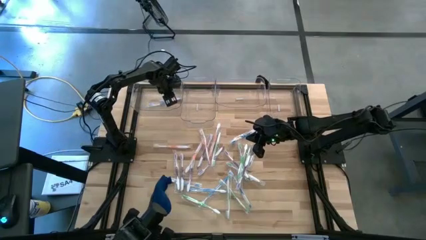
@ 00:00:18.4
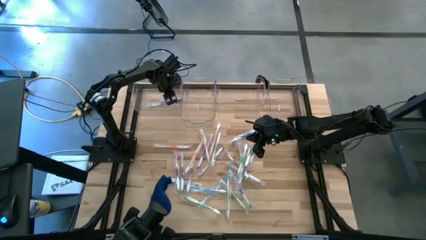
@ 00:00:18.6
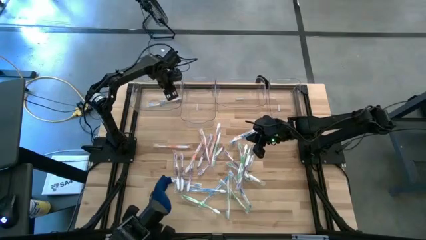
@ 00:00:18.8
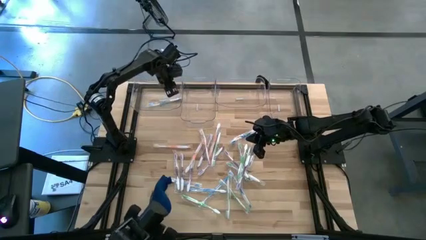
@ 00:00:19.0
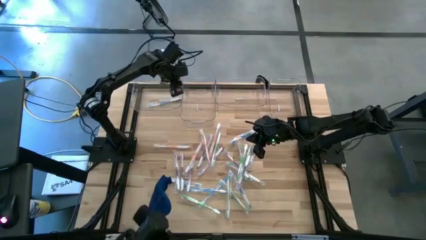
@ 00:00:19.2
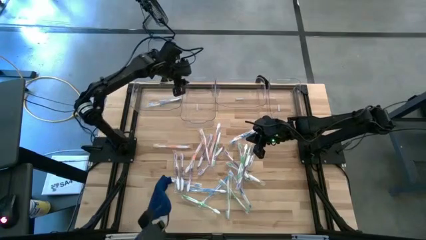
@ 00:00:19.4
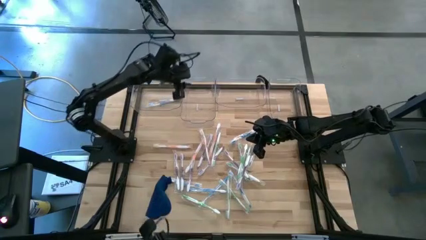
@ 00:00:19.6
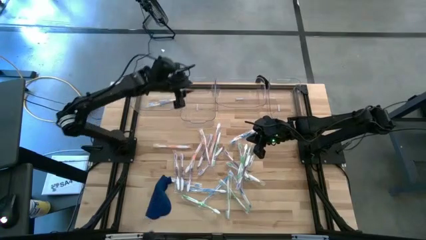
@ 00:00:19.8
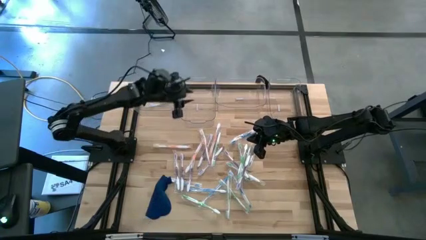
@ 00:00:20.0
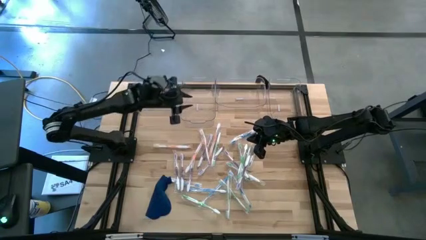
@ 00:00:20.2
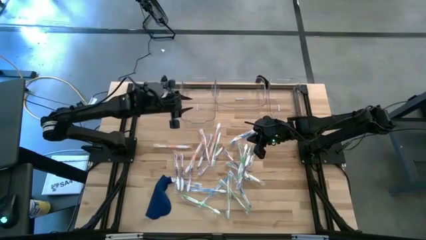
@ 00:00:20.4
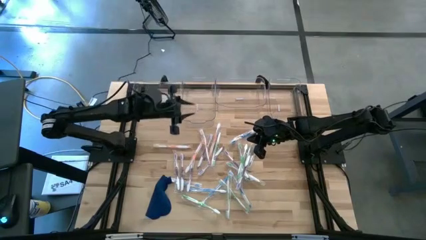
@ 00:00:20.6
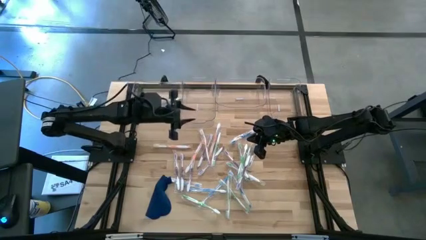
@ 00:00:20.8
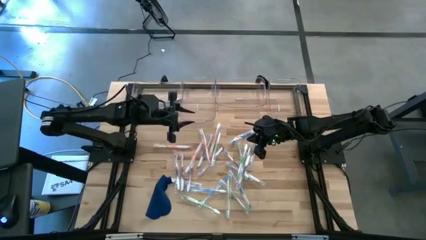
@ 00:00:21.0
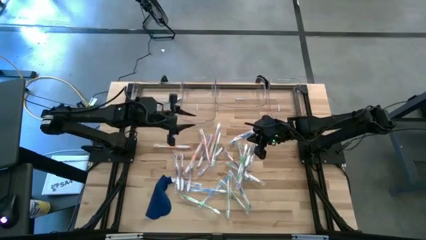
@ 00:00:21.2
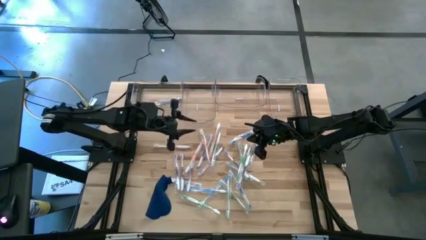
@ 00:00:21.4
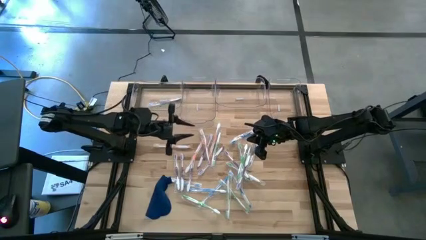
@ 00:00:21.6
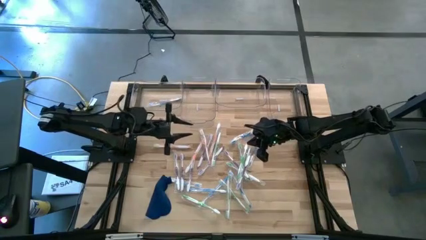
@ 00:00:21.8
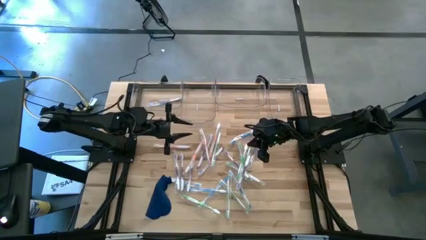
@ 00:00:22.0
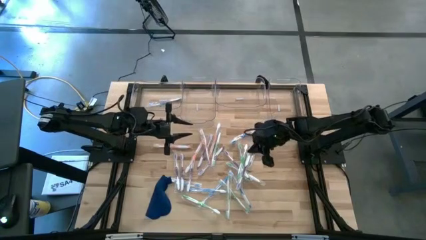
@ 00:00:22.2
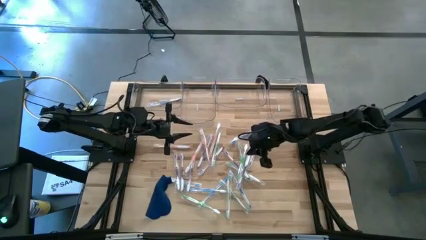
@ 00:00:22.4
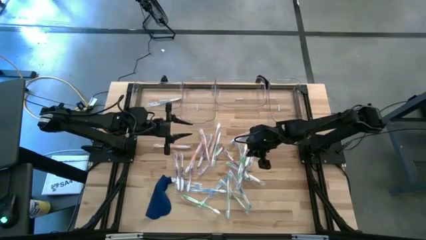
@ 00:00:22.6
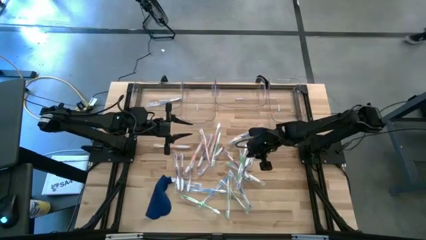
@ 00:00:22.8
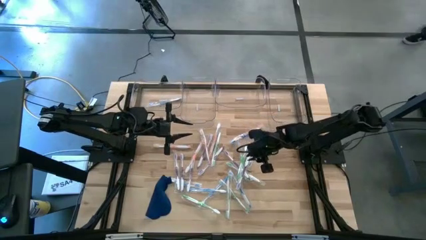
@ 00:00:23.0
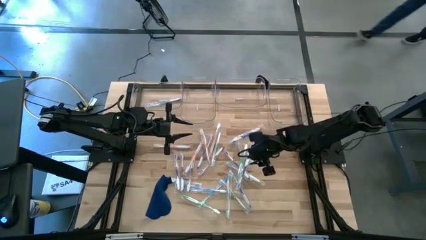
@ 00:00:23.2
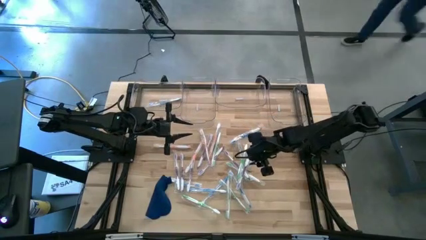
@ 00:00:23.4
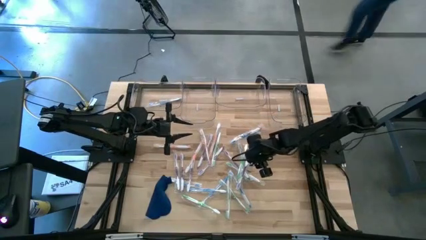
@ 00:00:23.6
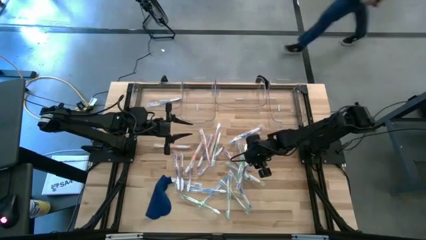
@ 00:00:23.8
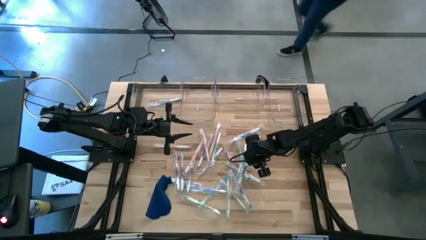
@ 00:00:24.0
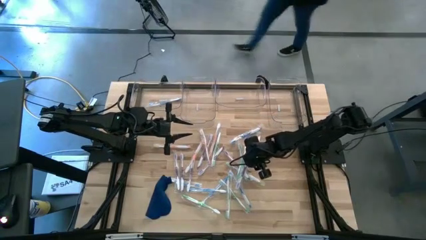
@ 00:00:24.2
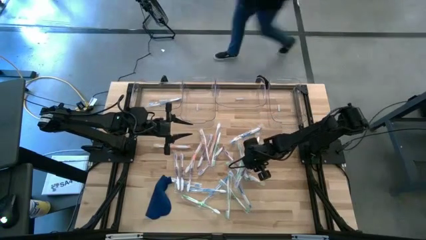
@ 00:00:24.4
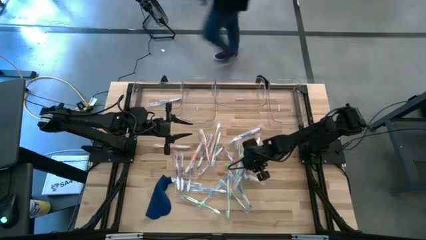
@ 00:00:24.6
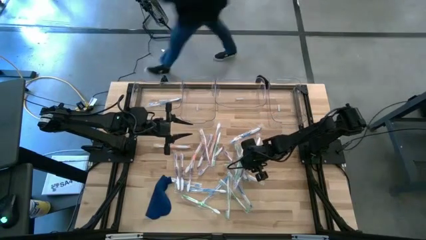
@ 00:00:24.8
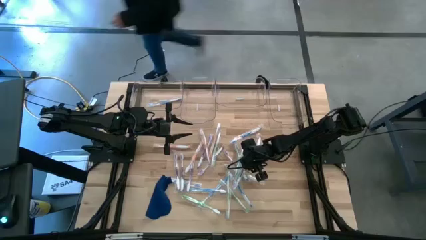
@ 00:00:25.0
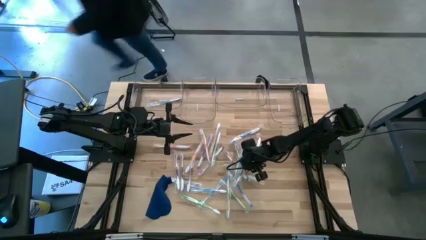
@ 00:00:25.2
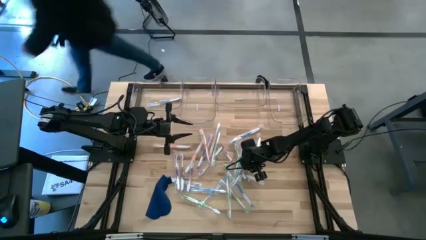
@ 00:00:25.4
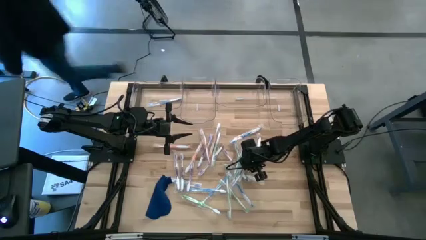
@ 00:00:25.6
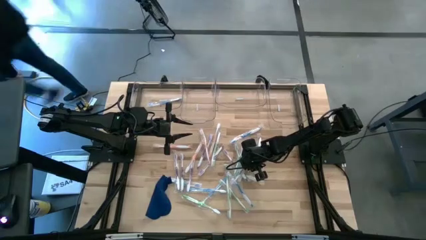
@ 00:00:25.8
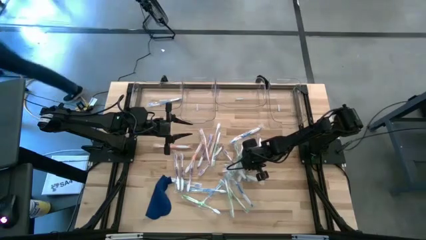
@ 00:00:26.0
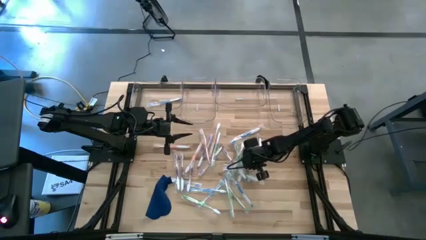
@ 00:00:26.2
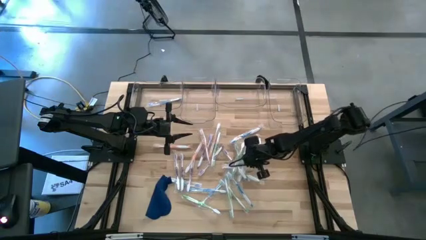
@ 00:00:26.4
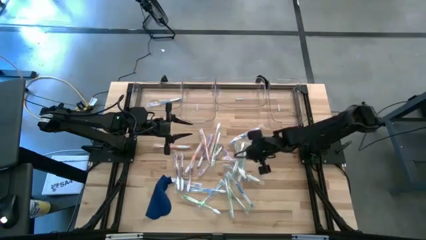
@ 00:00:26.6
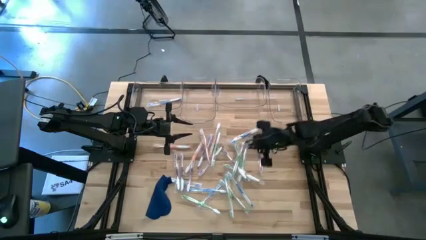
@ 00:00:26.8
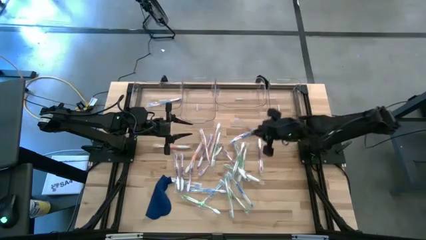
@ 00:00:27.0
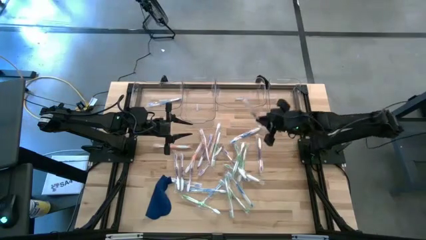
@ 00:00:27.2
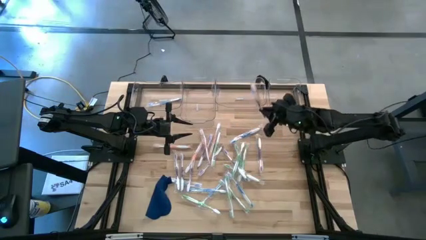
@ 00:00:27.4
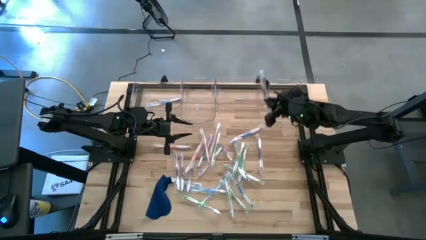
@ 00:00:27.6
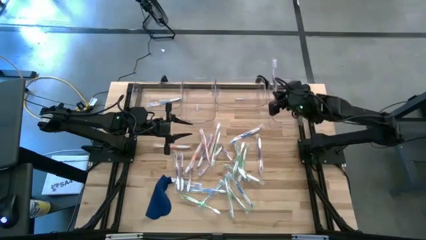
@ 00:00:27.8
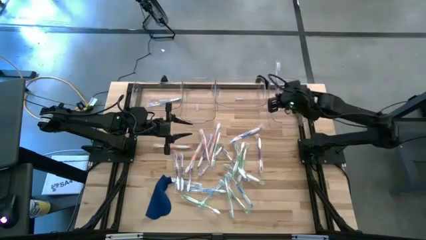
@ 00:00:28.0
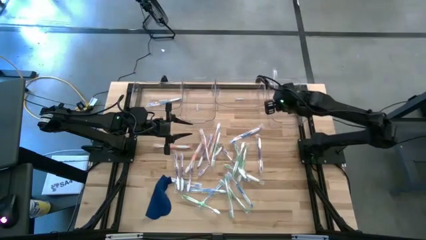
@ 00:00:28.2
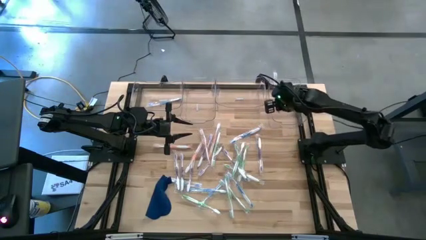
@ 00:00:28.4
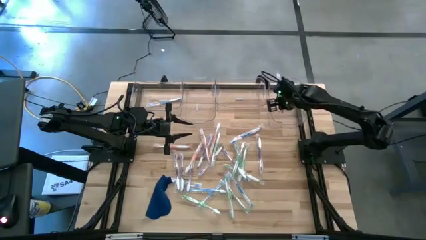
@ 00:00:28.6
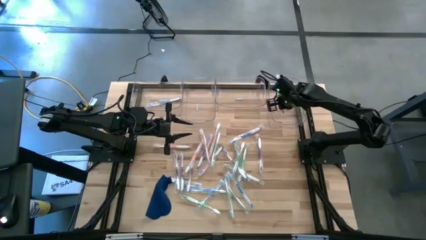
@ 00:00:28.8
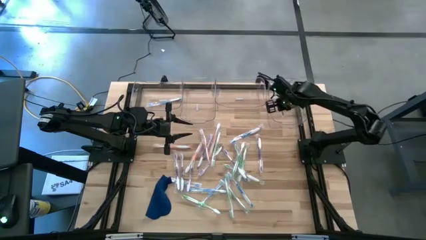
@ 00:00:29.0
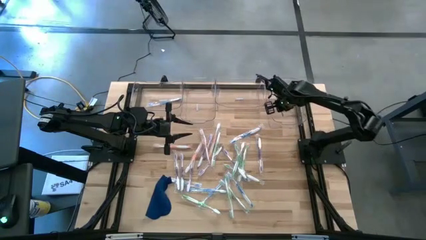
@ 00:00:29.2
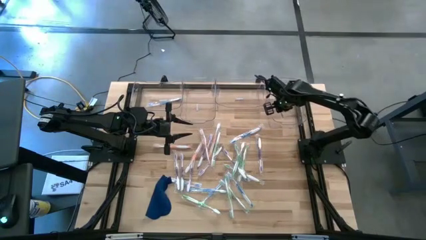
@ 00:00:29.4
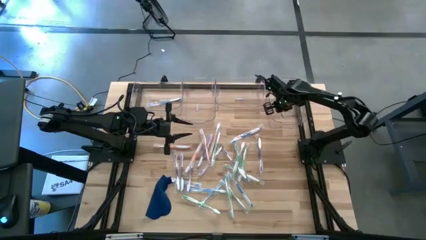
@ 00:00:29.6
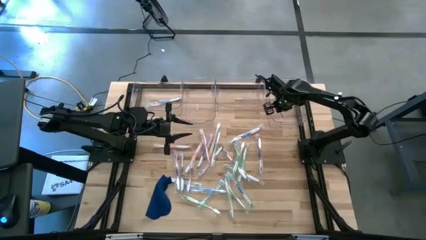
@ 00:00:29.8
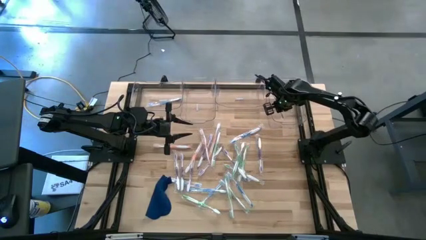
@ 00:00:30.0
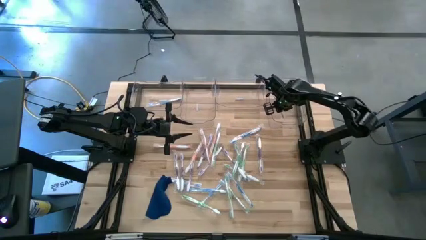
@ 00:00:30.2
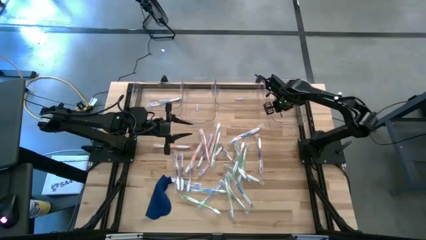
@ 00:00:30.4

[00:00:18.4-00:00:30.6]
Task: Pick & Place Toothbrushes
Put the purple toothbrush into the right transparent bin

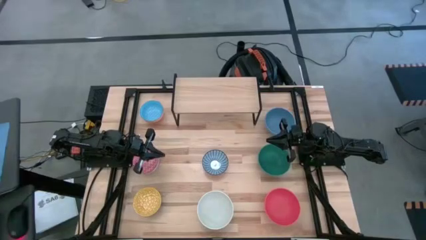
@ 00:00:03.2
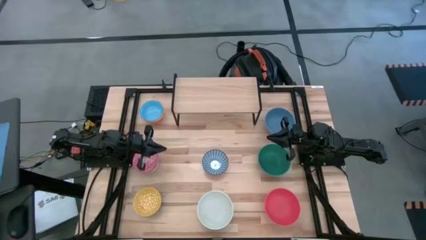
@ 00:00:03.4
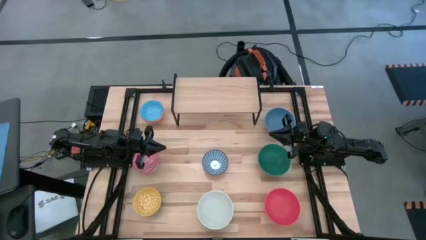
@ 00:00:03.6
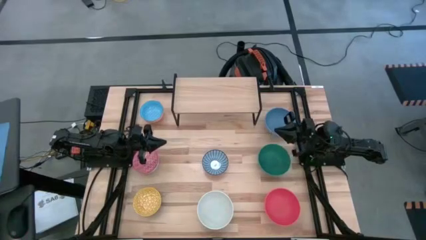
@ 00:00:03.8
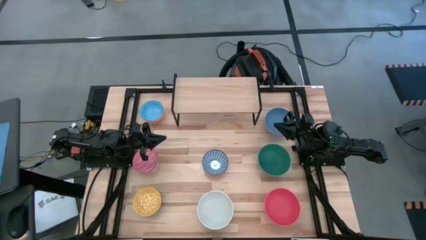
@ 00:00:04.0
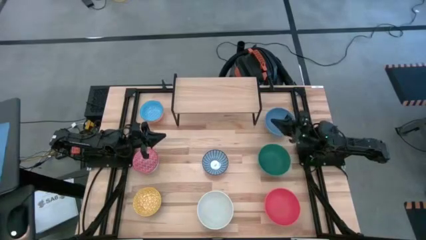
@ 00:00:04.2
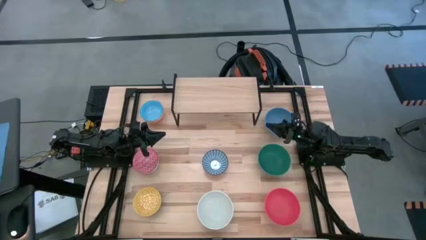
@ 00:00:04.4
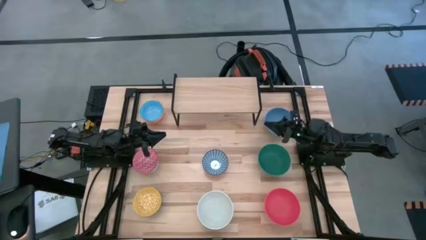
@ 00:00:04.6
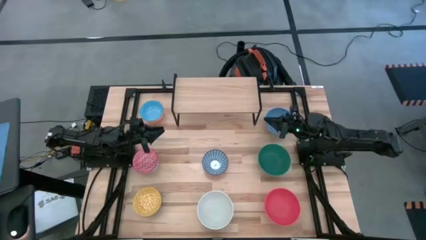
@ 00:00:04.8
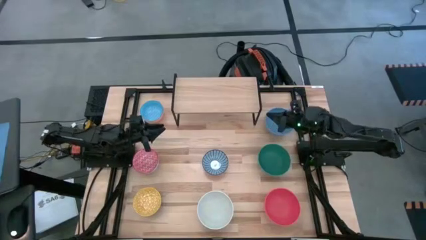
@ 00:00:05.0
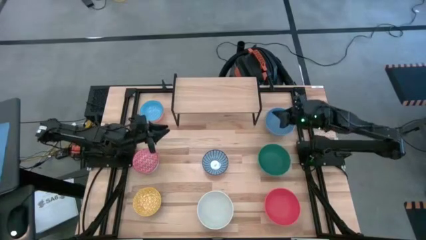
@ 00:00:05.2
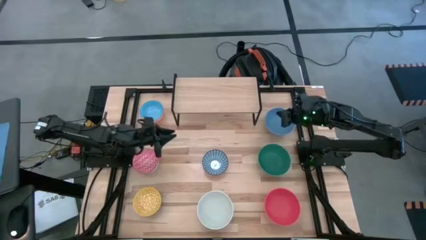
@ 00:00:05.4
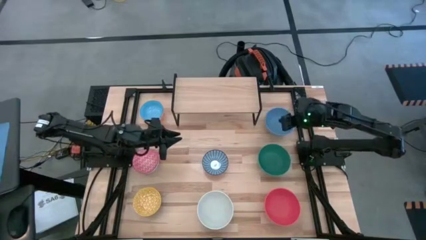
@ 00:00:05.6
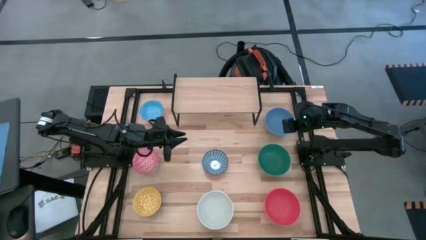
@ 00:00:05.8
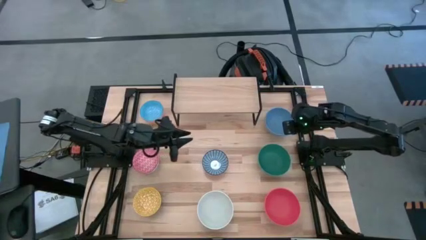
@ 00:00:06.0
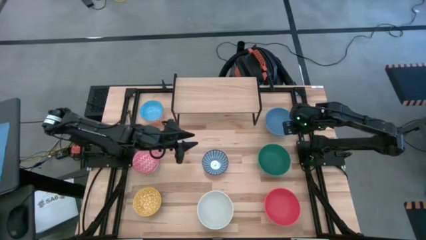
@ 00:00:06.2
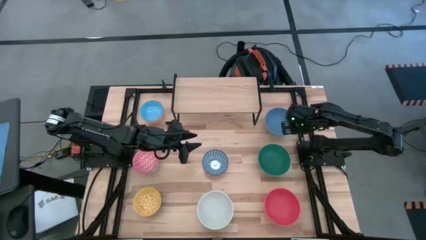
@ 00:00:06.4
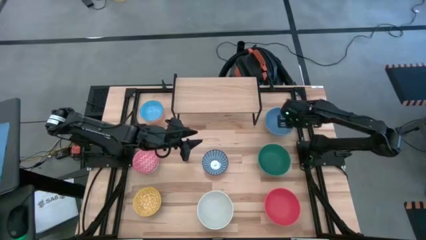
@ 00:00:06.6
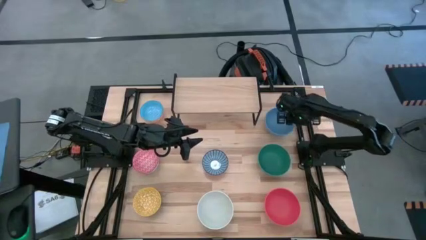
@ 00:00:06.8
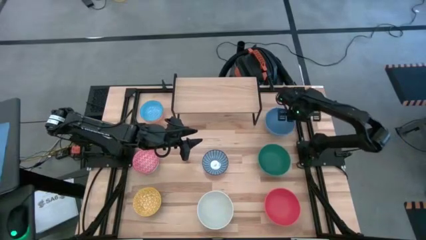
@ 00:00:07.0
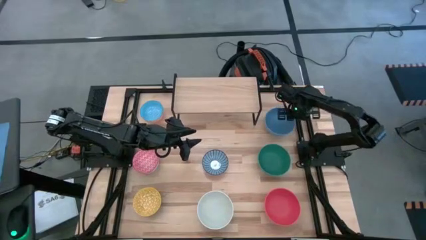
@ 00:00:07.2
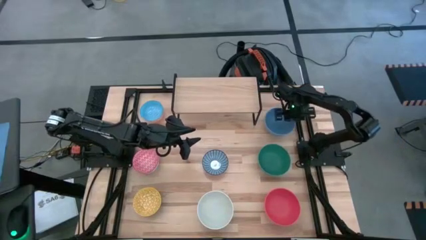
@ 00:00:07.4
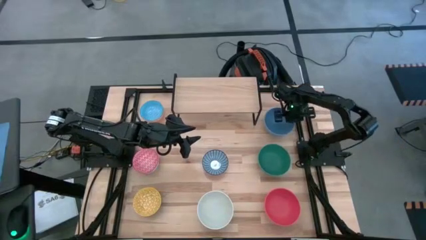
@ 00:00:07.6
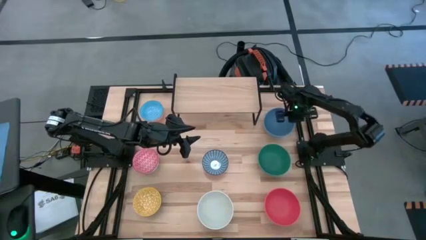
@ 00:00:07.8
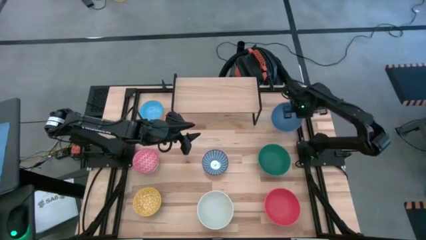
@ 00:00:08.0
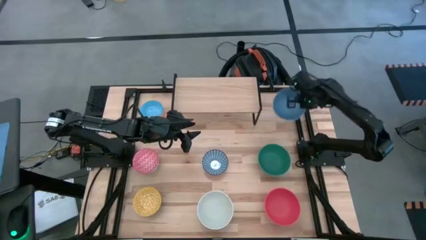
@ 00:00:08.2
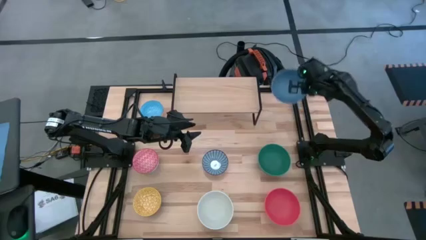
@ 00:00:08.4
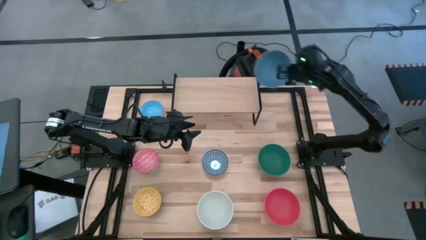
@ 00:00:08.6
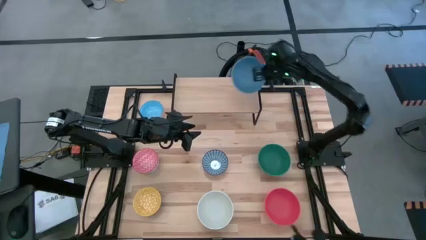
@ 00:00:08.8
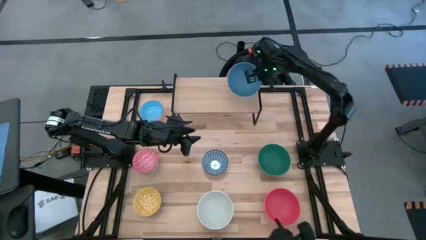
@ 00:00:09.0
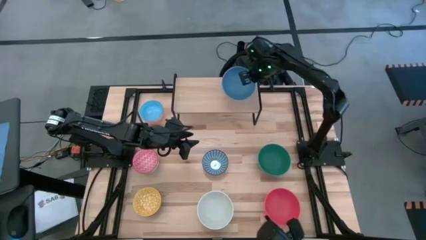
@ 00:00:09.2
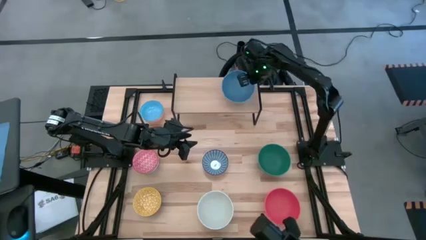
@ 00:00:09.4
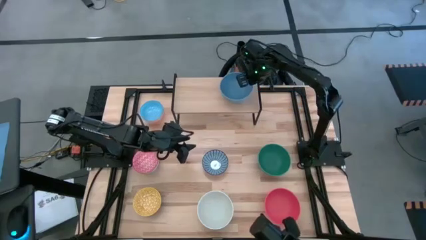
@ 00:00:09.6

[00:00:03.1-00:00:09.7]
Task: Place and stack bowls onto a shelf
Put the blue bowl on the shelf
